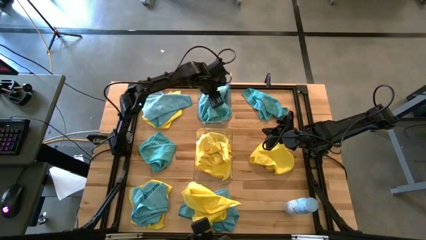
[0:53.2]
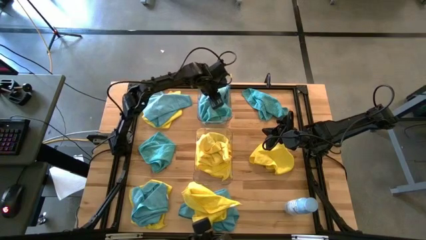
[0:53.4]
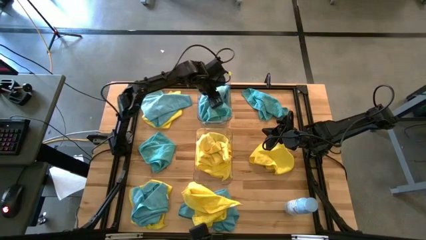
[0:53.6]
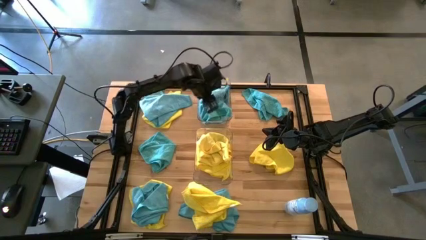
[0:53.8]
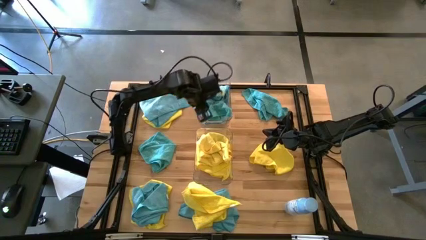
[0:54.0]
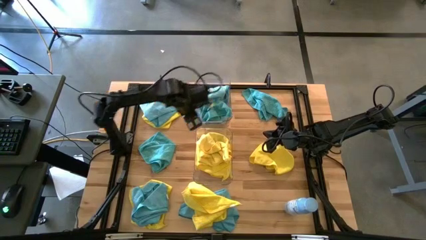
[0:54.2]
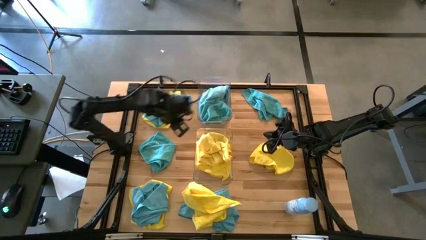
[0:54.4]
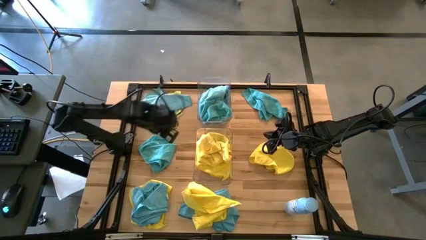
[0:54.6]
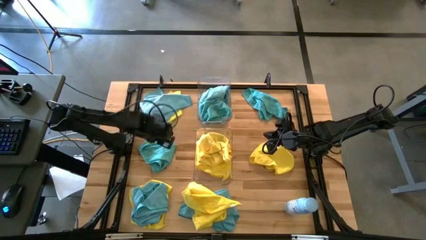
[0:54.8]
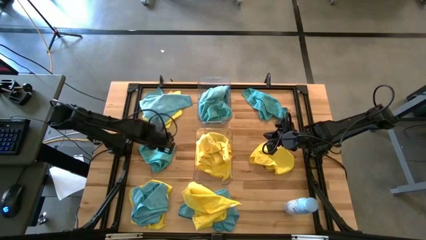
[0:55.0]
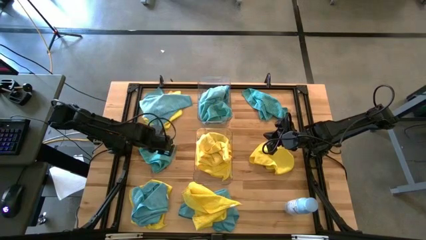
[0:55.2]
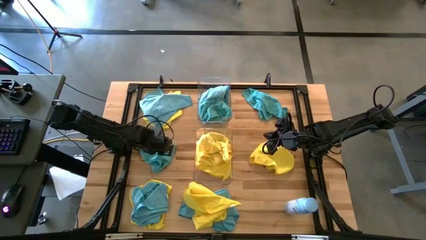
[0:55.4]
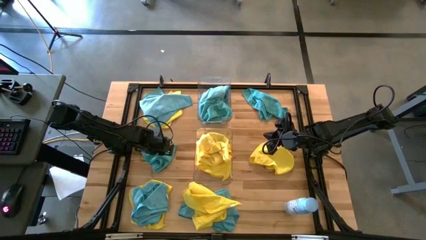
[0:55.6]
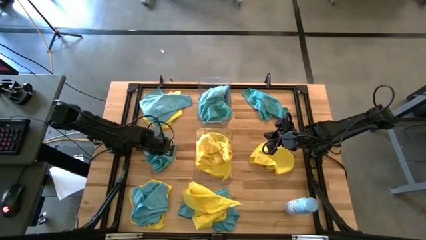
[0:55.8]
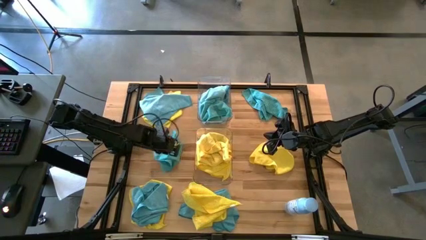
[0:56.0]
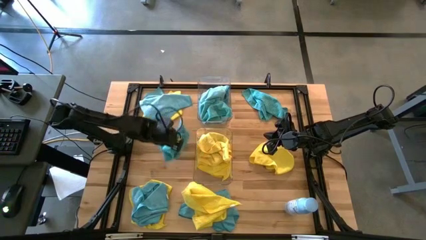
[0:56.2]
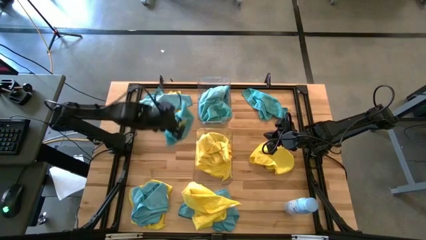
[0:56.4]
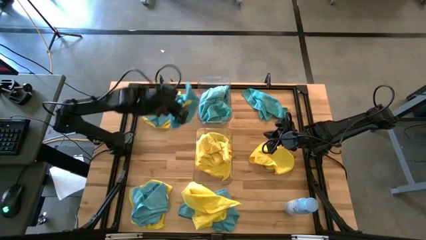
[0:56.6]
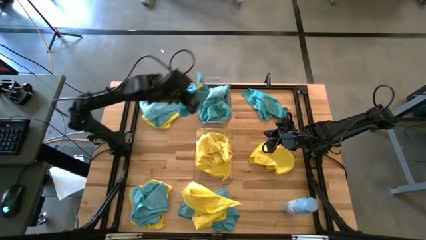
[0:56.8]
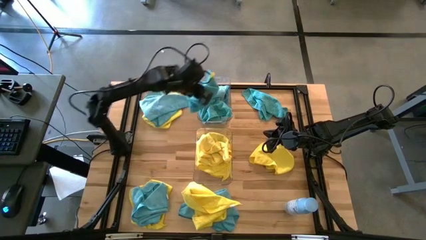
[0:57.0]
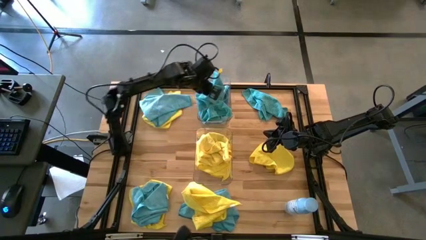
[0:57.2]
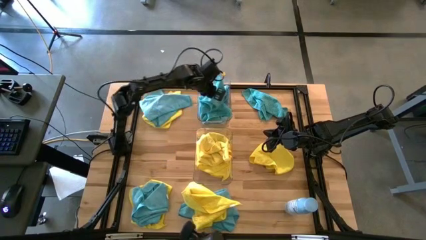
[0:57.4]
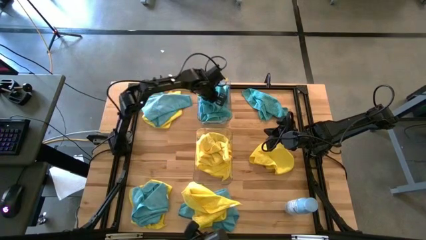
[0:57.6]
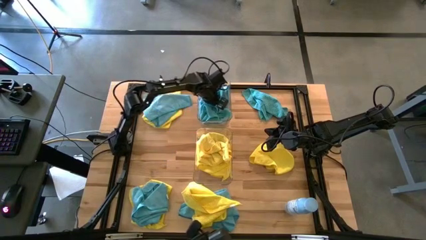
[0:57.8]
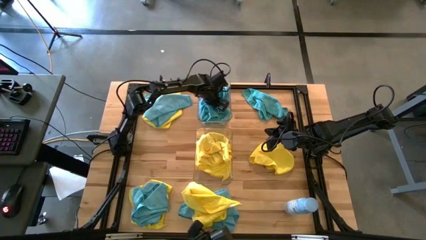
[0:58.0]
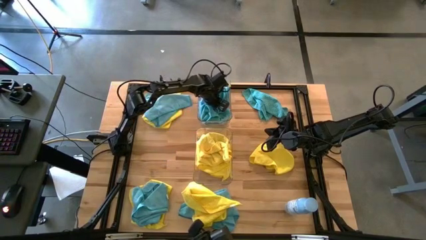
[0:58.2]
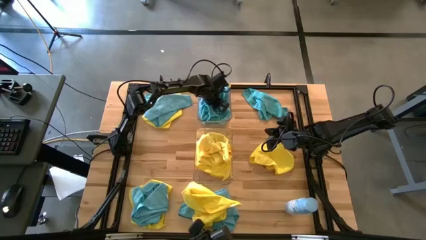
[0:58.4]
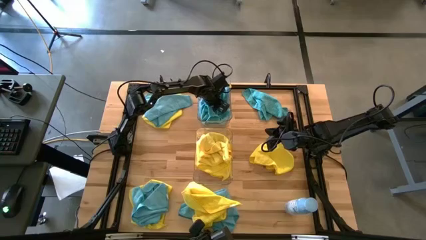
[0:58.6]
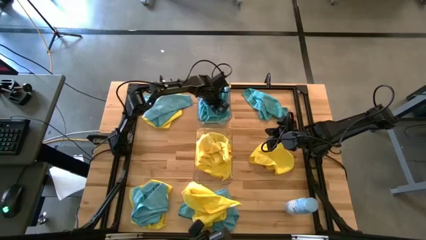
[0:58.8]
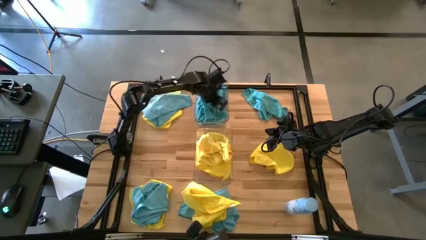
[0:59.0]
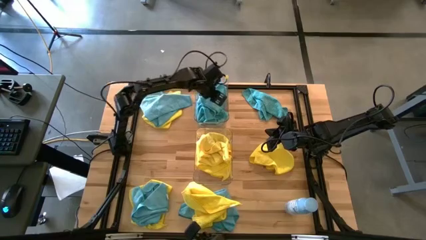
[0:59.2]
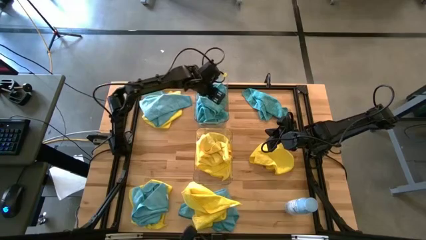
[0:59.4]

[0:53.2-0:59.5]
Task: Sort microfiber towel by color & place in baskets
Put the blue towel into the top transparent bin

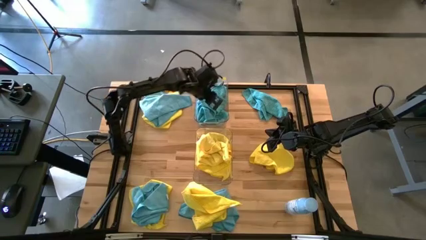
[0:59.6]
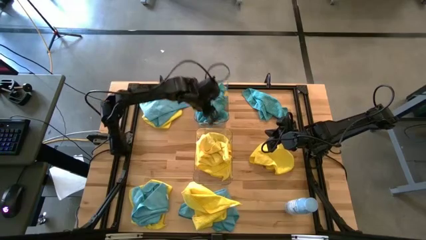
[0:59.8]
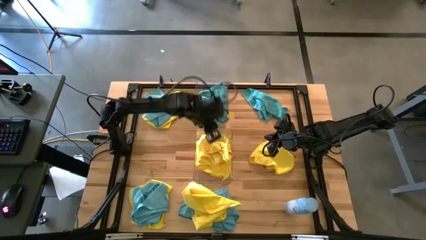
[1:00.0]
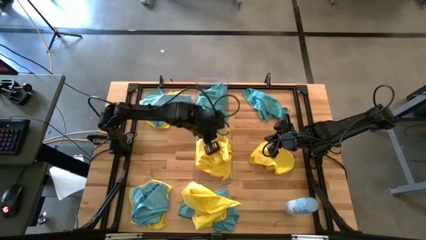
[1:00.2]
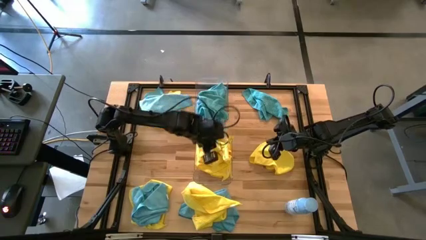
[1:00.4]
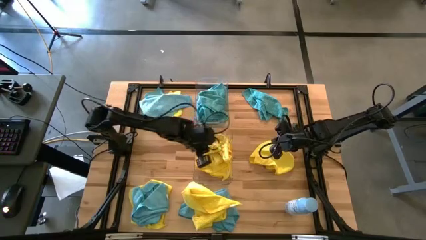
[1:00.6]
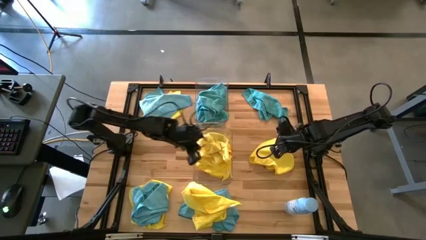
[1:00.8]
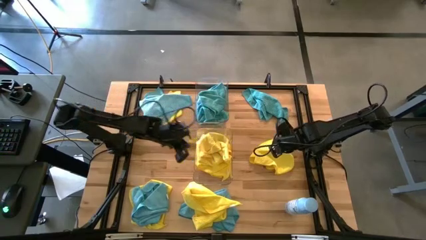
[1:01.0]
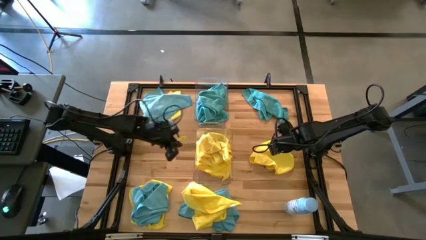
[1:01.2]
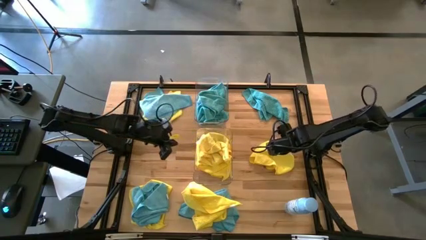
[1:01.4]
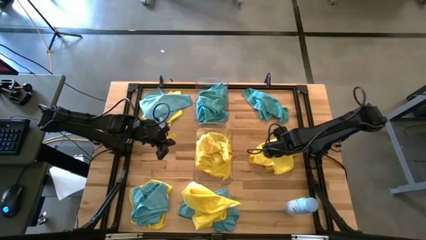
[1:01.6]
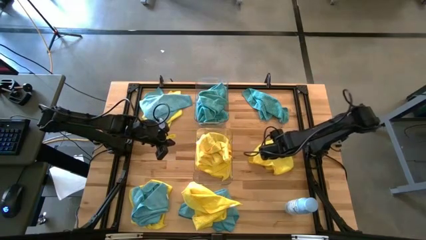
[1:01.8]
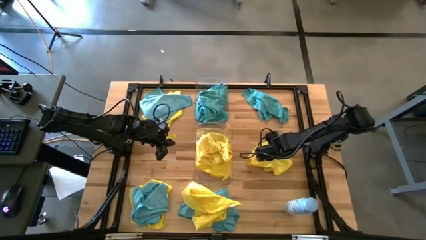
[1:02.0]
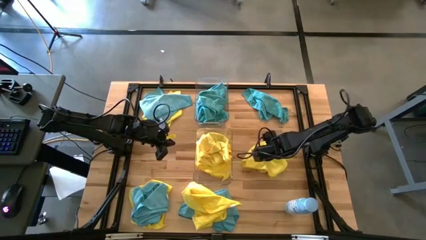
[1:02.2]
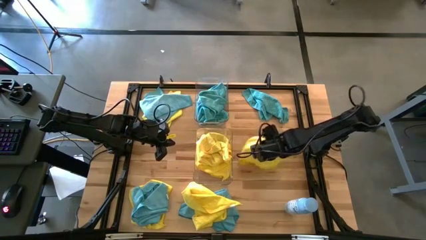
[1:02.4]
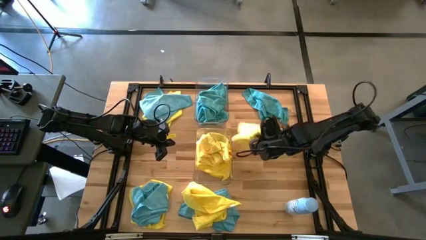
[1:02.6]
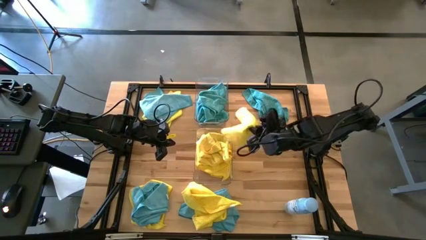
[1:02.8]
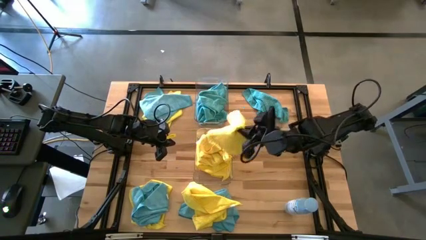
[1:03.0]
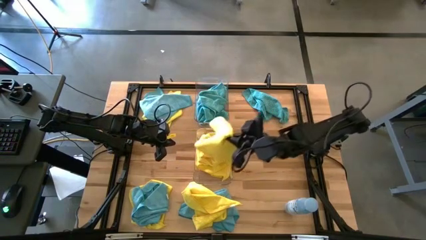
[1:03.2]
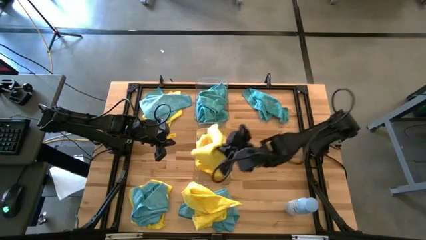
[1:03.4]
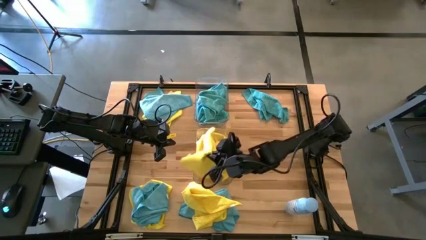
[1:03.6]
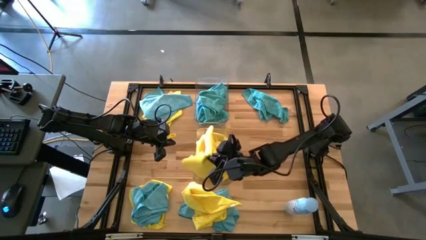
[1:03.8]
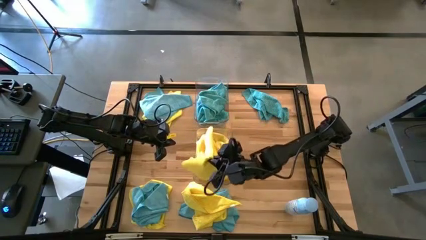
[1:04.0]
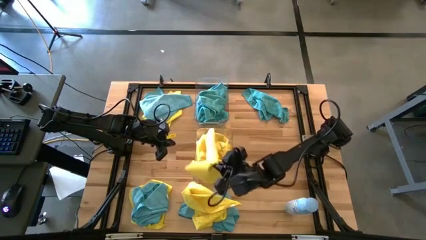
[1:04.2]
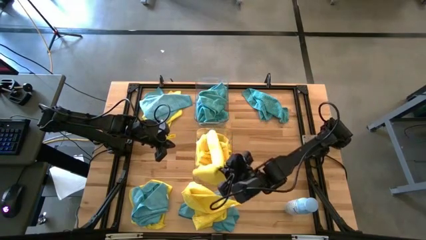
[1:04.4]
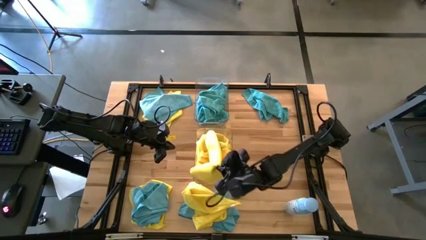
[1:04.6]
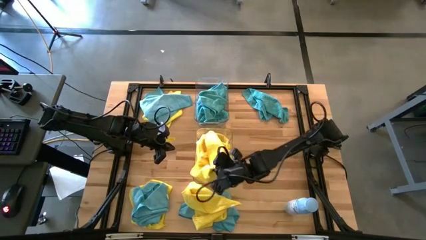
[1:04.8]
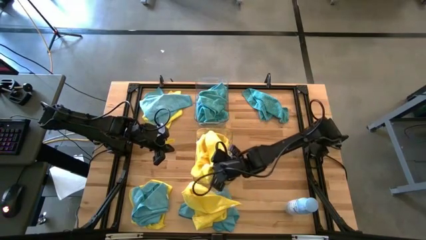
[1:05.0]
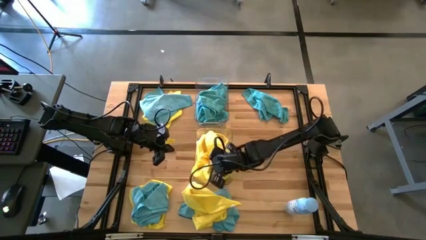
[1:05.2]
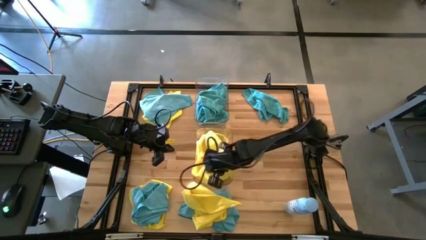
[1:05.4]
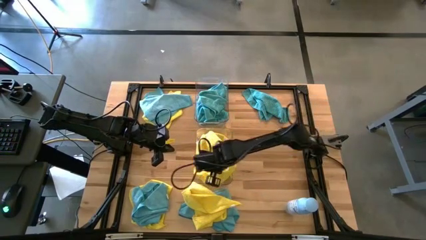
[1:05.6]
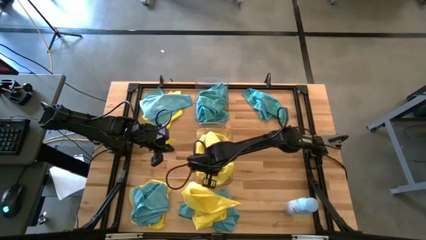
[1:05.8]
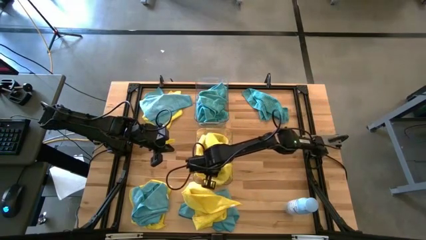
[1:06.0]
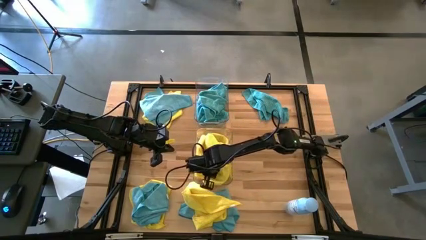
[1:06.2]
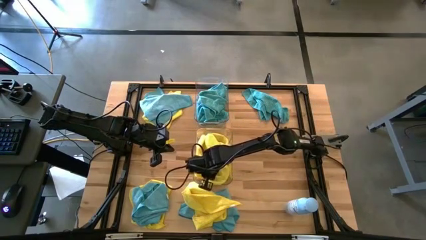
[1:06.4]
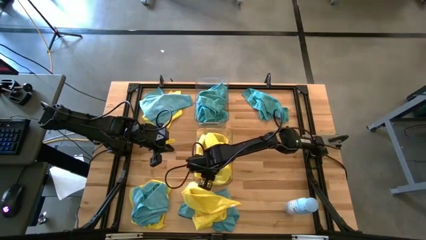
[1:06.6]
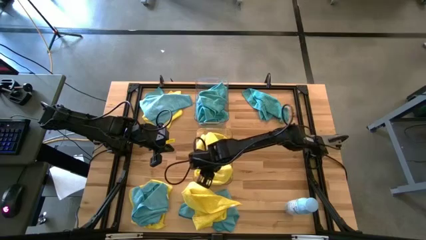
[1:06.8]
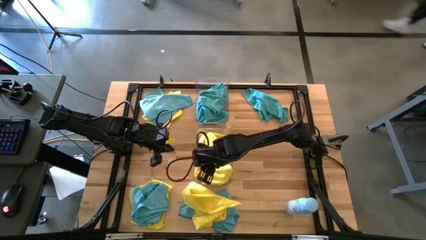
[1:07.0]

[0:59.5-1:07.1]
Put the yellow towel into the bottom transparent bin
